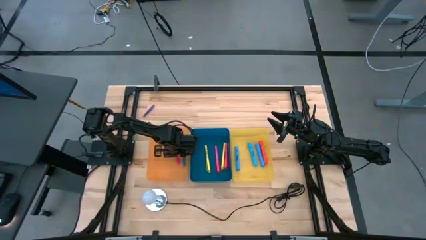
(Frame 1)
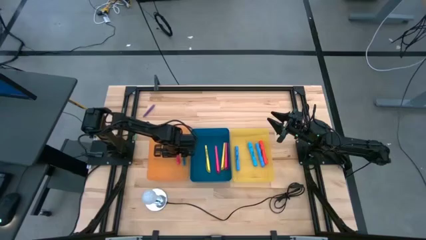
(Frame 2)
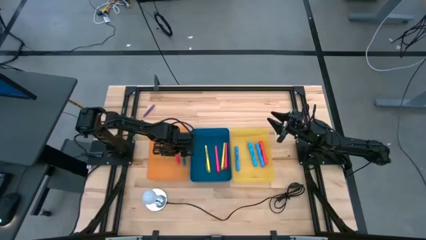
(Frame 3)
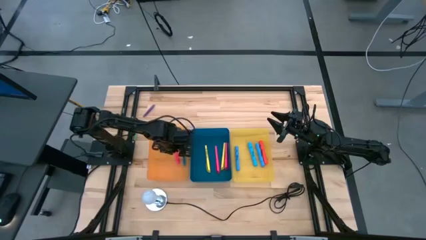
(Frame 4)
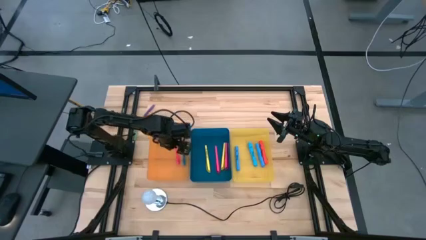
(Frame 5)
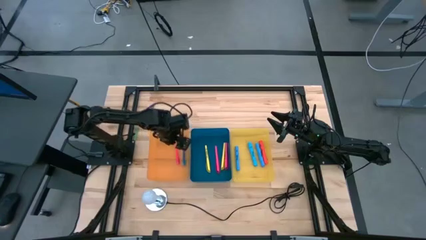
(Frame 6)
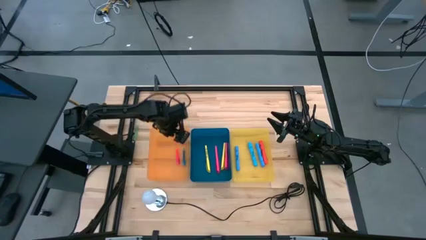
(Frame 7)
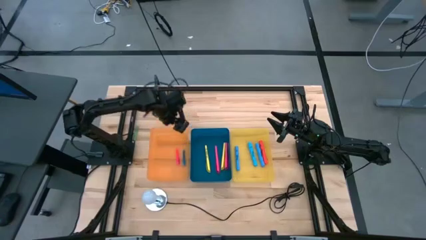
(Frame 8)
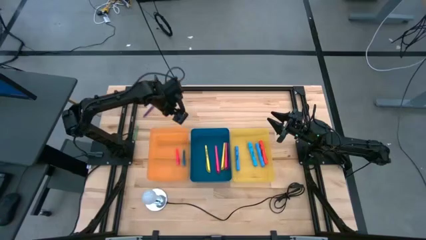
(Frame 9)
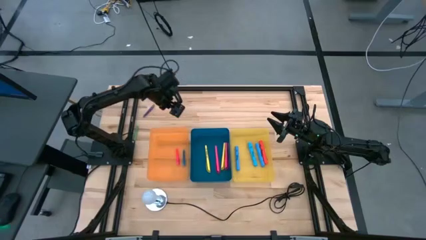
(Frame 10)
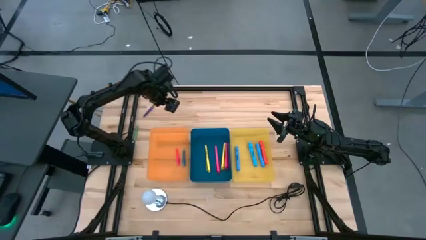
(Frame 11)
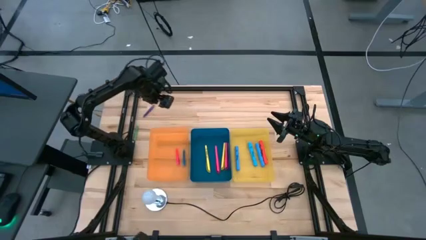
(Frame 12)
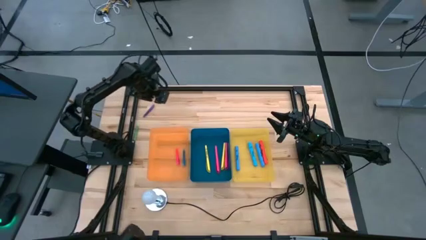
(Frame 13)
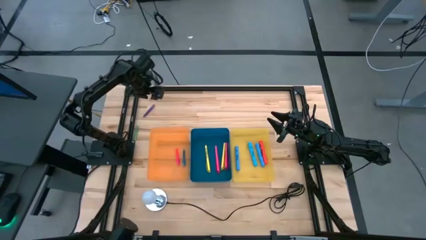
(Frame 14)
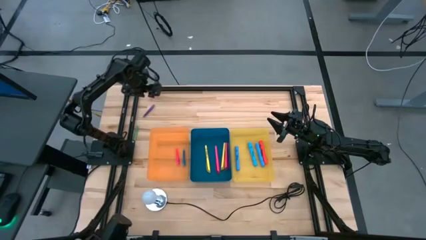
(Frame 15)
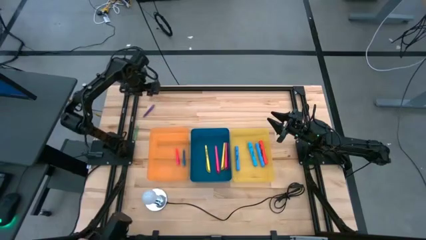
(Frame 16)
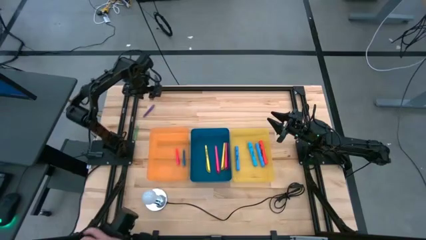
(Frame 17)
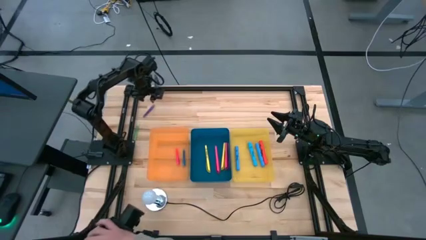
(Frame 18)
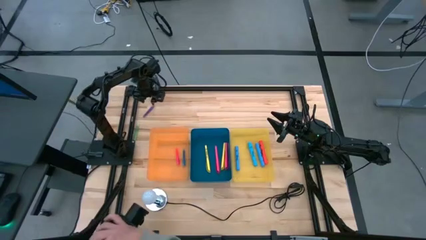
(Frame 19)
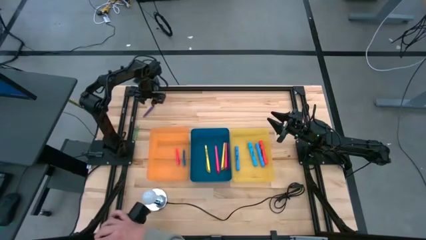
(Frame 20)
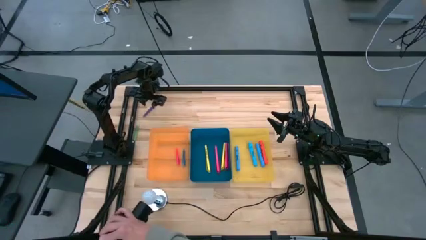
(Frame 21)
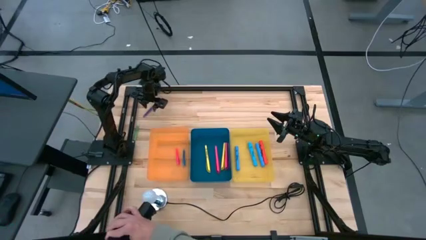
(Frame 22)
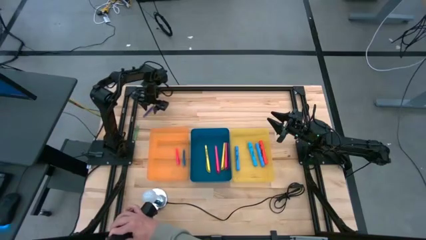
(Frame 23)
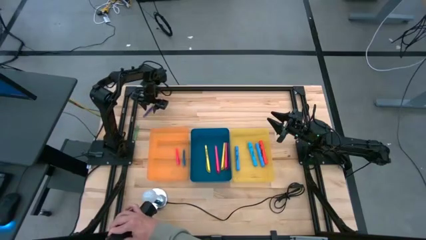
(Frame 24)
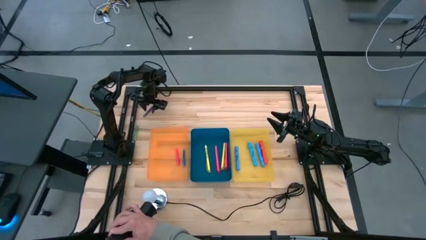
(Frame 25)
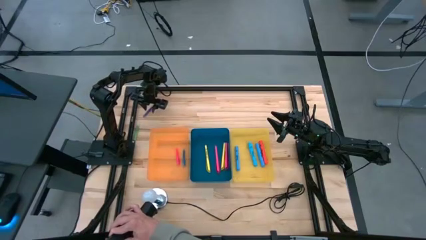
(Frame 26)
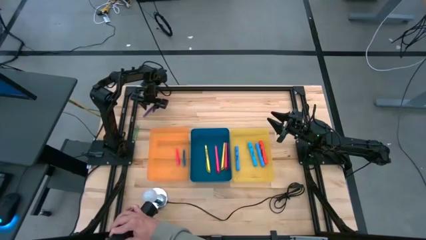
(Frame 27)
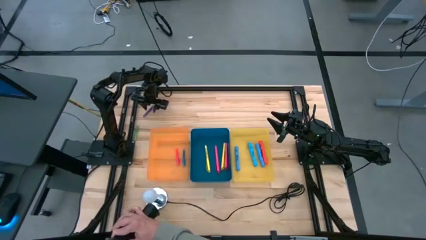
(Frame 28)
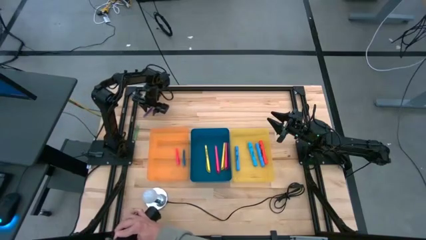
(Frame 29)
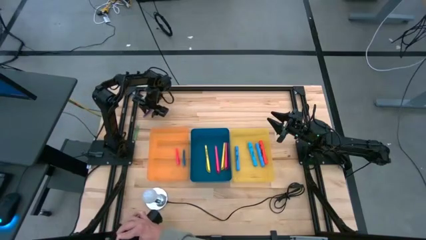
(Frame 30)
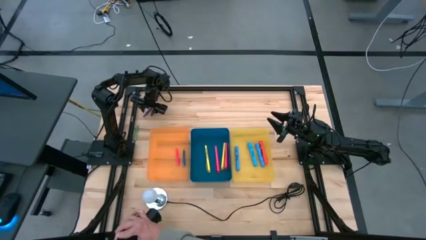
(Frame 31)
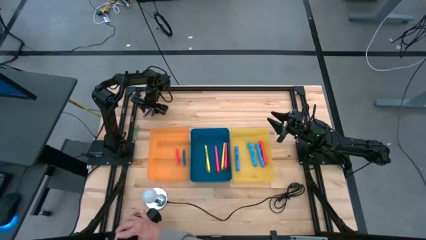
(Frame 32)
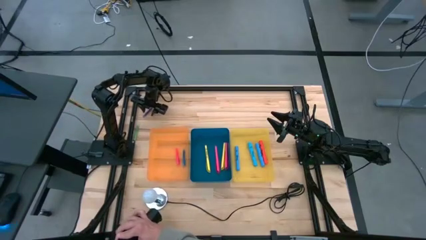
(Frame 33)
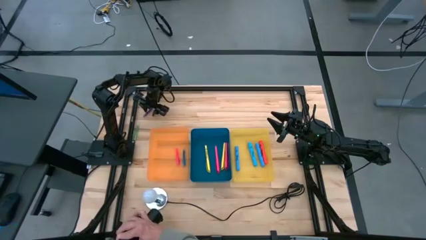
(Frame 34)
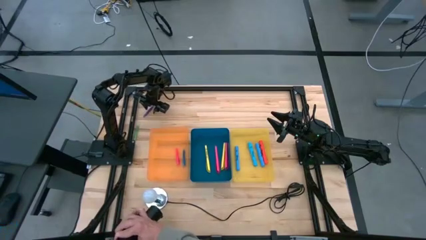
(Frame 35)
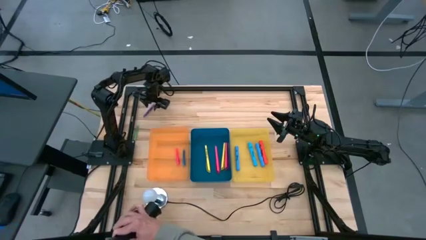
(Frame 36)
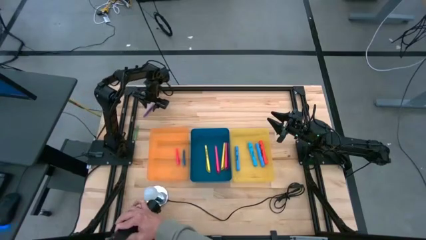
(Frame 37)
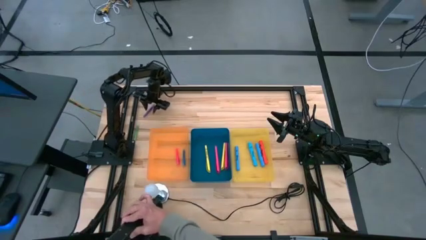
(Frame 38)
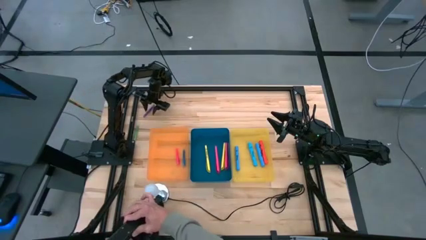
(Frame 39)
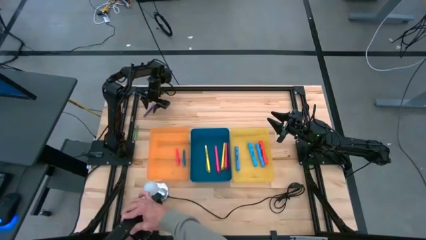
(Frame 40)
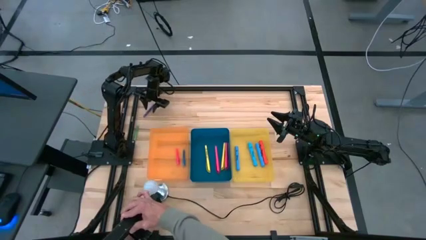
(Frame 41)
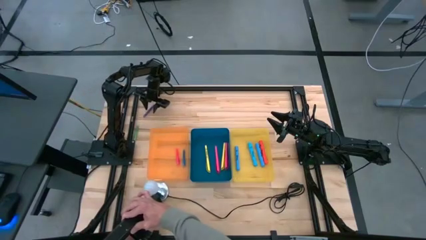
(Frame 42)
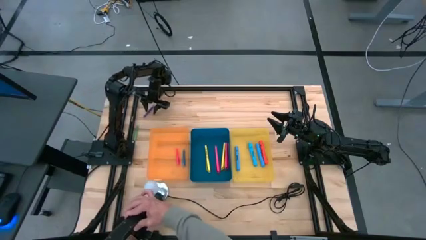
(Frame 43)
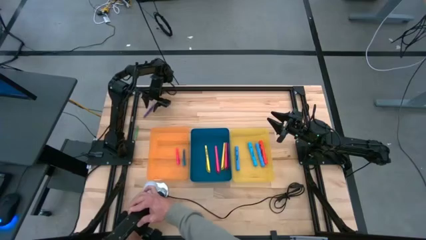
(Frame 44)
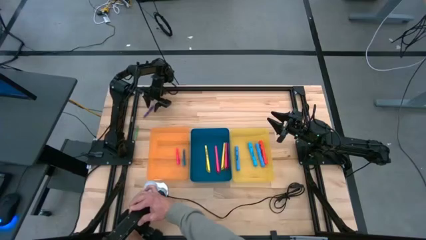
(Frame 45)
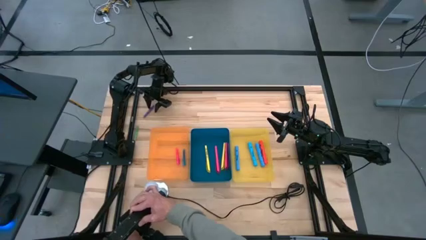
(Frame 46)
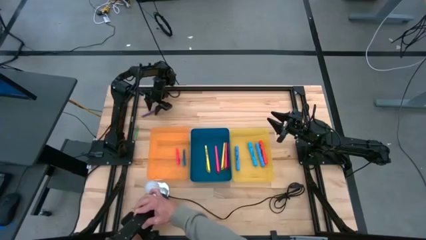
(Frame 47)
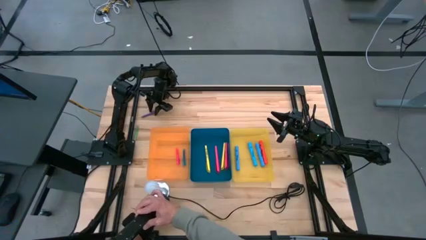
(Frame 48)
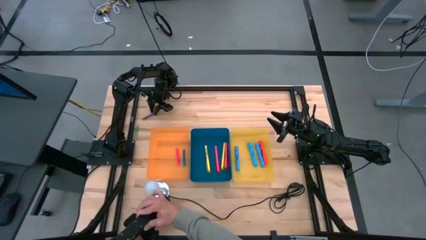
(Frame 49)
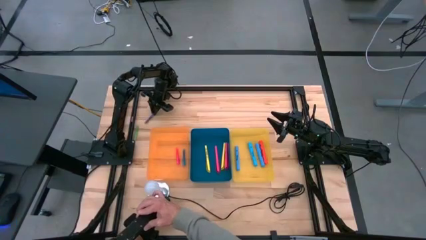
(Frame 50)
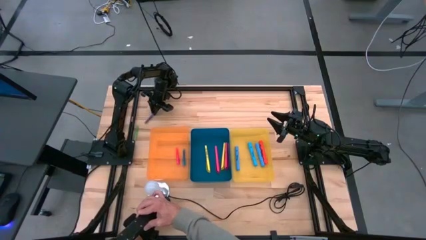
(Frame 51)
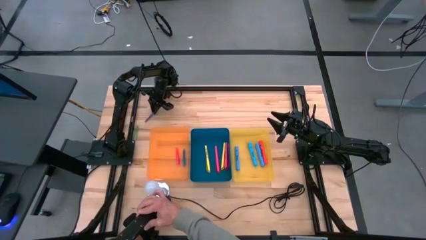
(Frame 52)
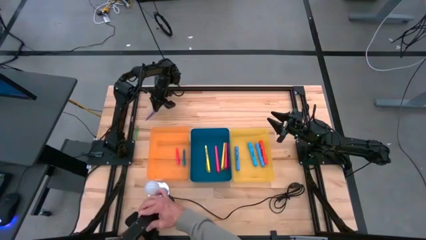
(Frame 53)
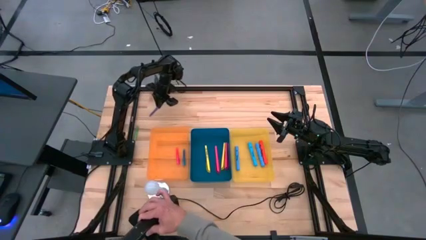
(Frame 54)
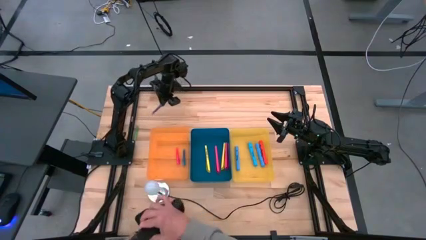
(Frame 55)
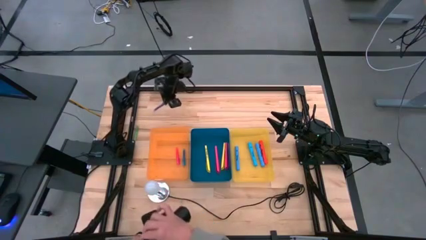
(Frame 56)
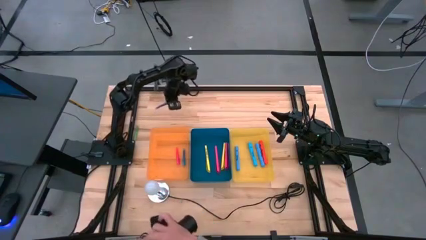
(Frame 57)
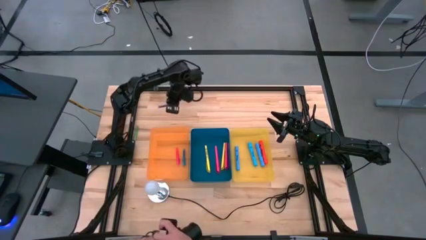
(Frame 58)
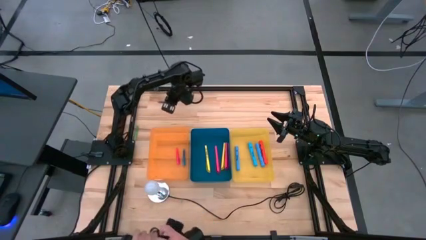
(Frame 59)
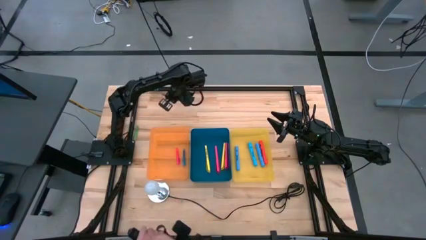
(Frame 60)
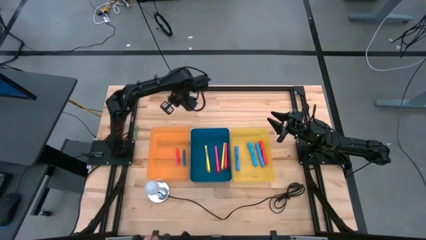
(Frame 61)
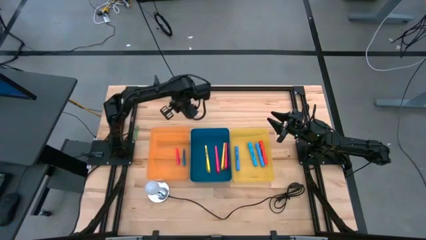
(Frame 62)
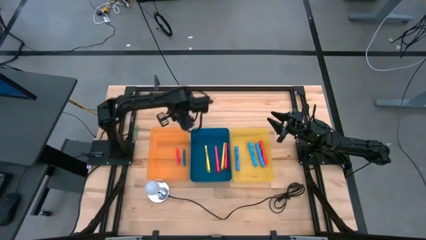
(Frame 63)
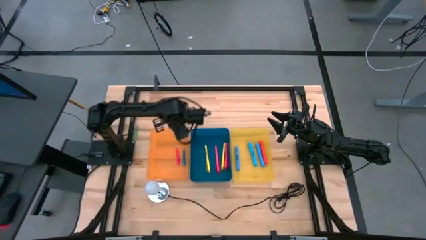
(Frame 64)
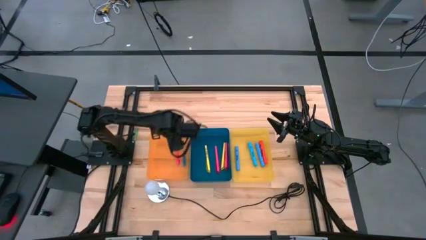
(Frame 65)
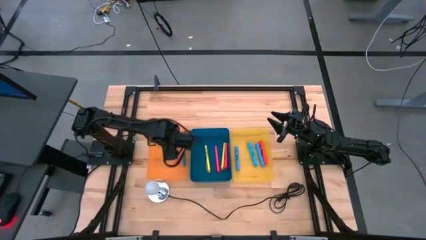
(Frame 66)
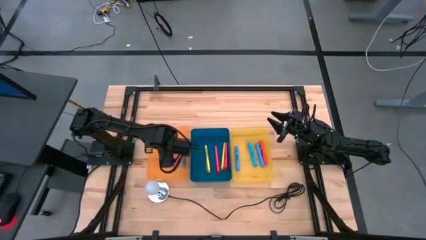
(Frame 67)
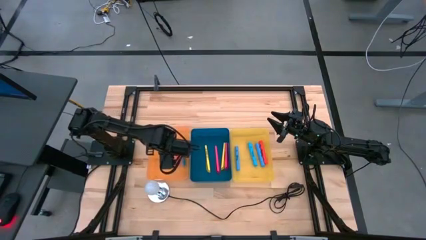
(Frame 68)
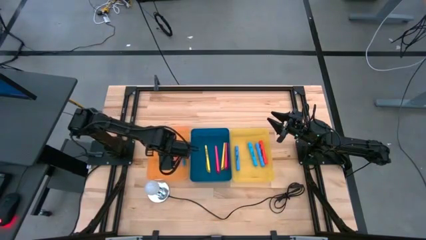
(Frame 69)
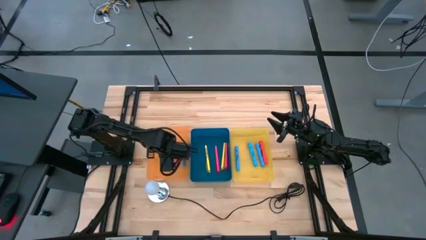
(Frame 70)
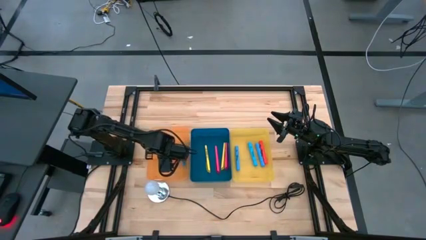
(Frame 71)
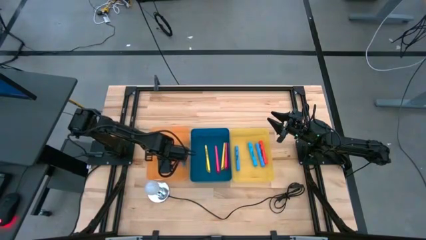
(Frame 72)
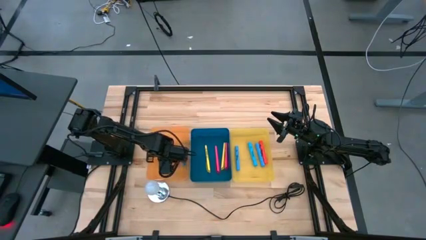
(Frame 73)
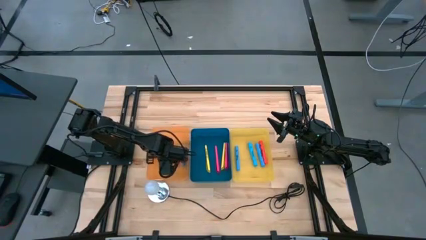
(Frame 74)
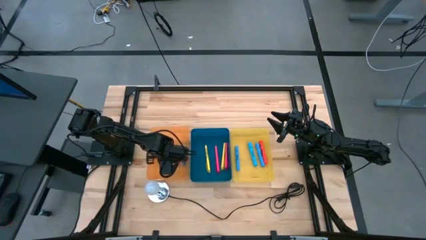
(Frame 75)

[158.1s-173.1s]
Task: Pick & Place Markers
Put the small violet pen into the orange bin
